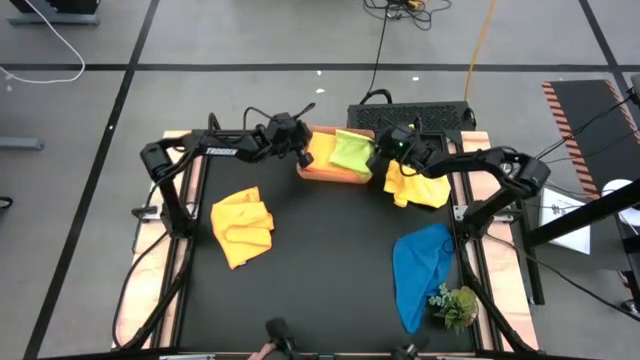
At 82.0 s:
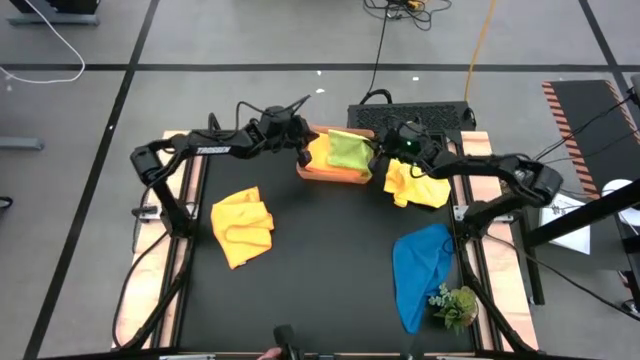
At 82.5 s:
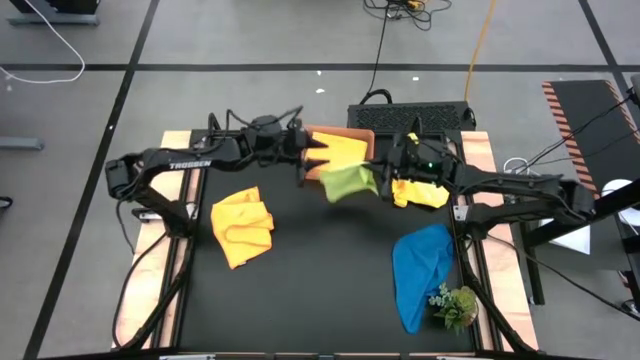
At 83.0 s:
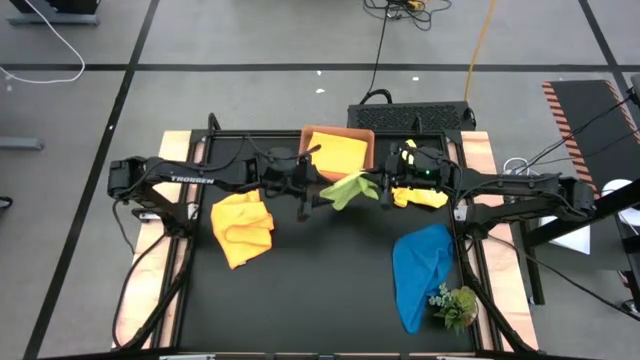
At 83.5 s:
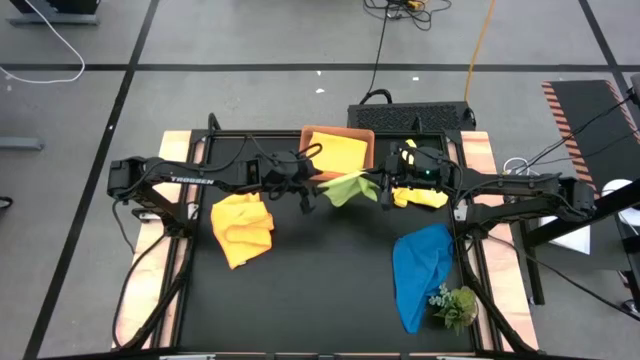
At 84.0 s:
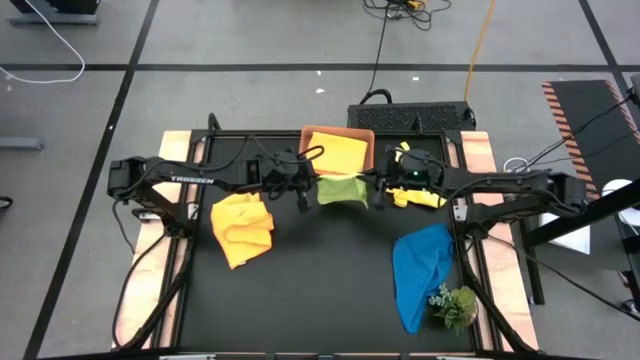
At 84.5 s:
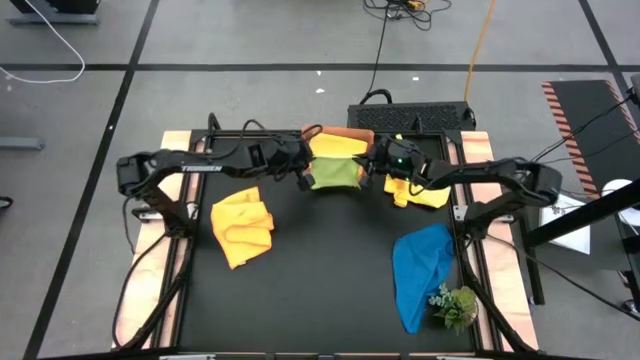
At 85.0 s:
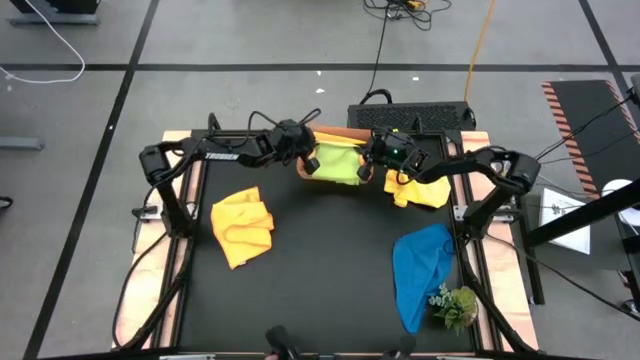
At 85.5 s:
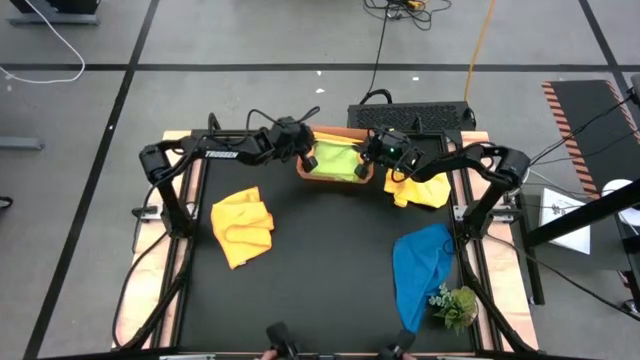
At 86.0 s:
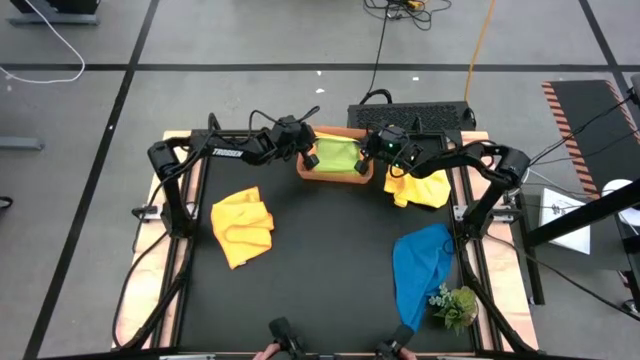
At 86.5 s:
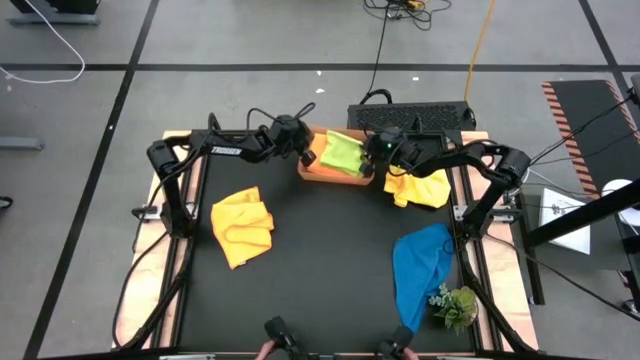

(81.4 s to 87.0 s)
Task: Fold microfiber towels
Put the green microfiber towel into the orange bin

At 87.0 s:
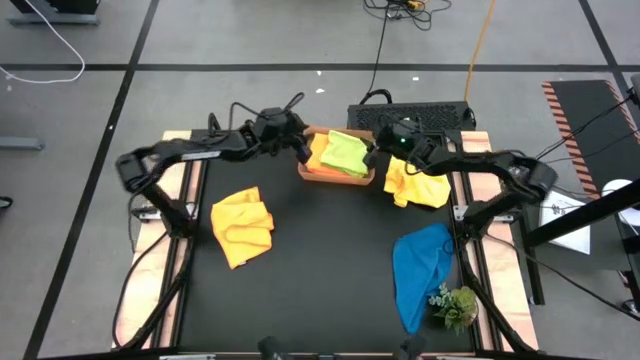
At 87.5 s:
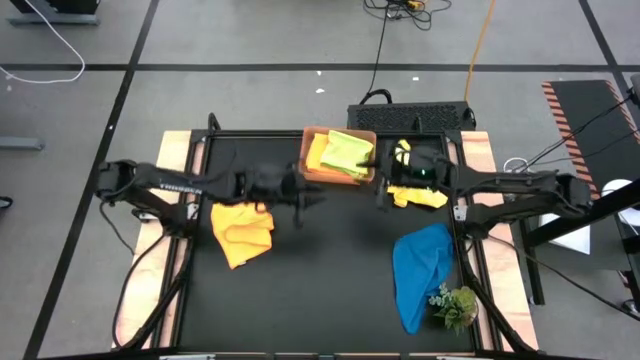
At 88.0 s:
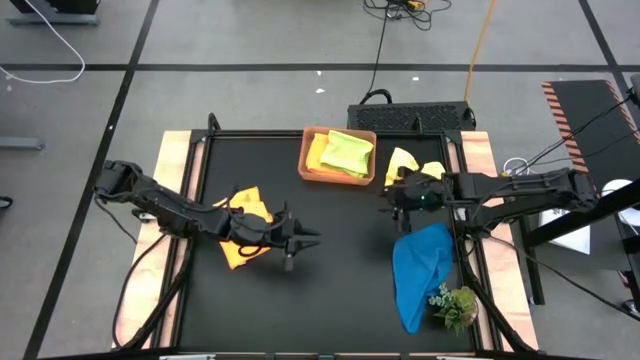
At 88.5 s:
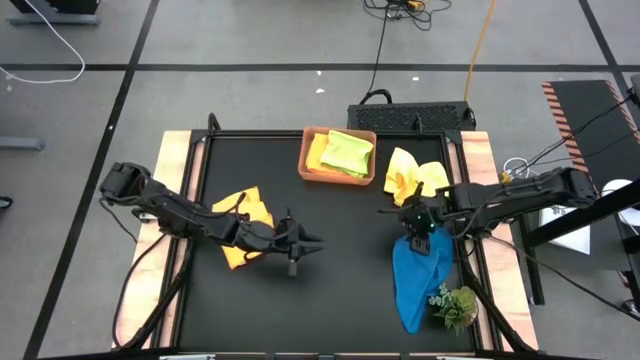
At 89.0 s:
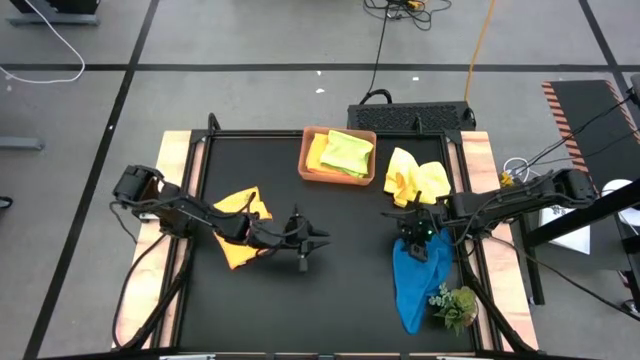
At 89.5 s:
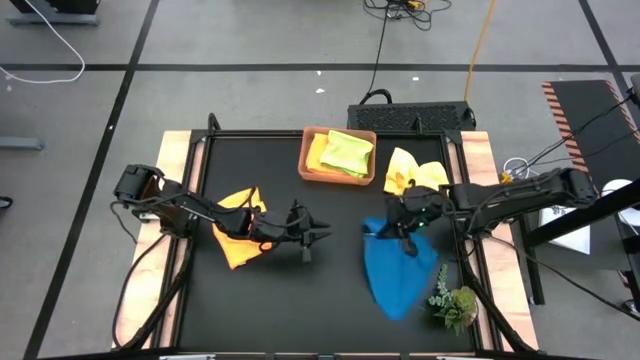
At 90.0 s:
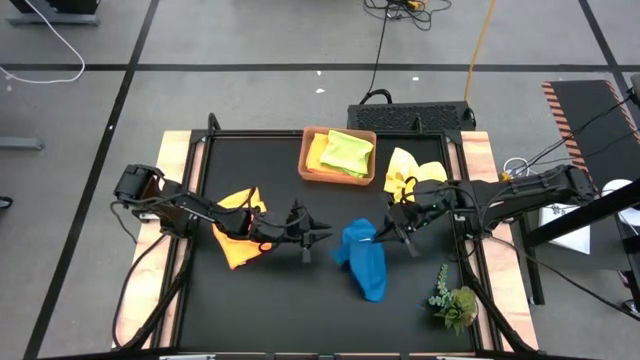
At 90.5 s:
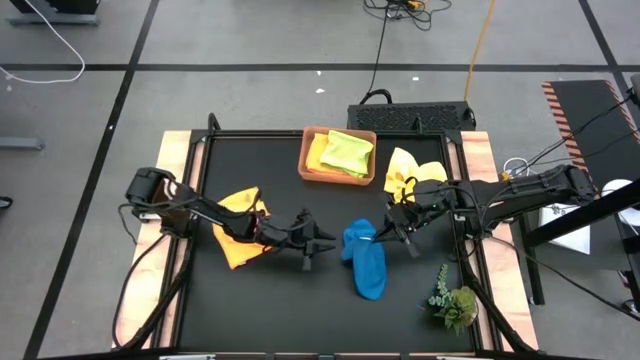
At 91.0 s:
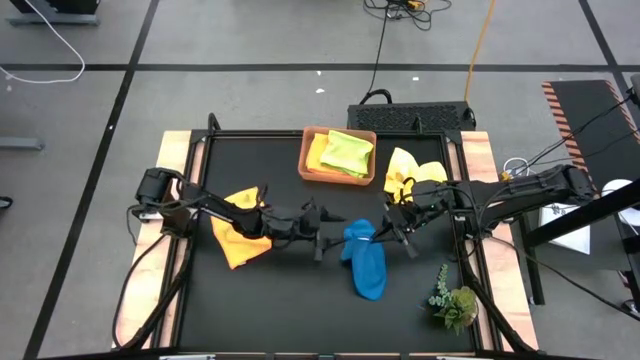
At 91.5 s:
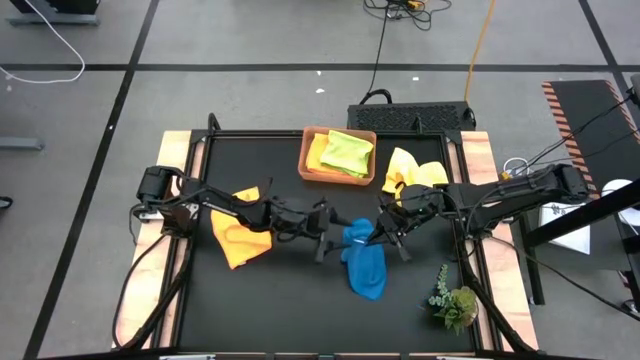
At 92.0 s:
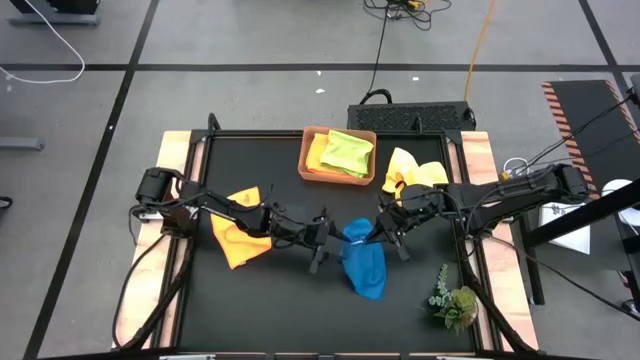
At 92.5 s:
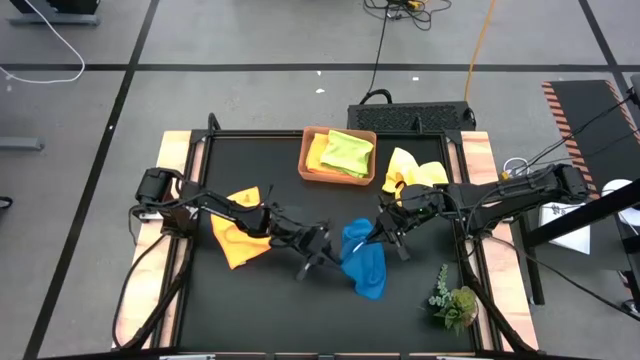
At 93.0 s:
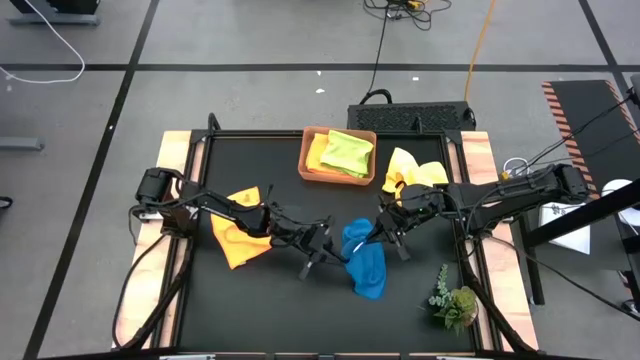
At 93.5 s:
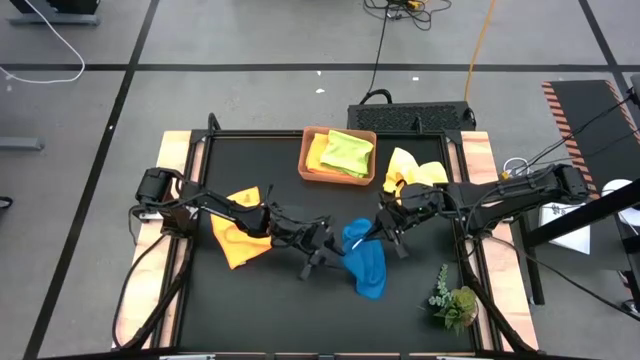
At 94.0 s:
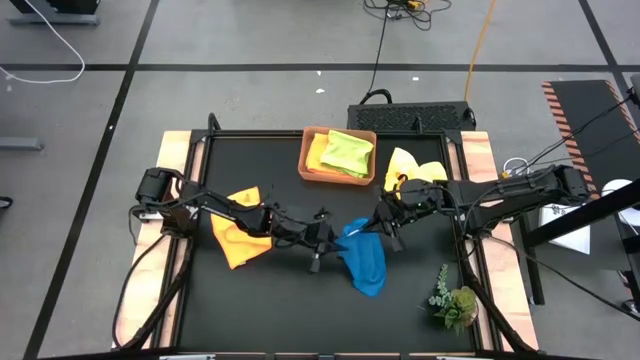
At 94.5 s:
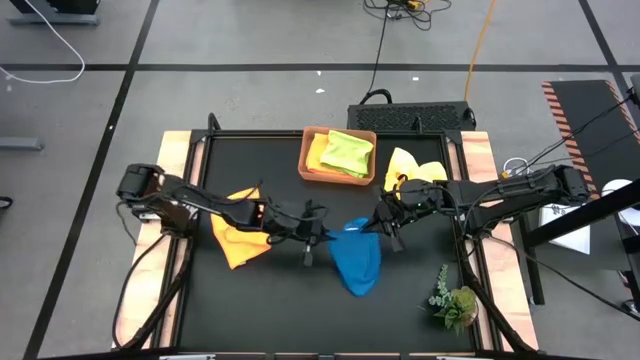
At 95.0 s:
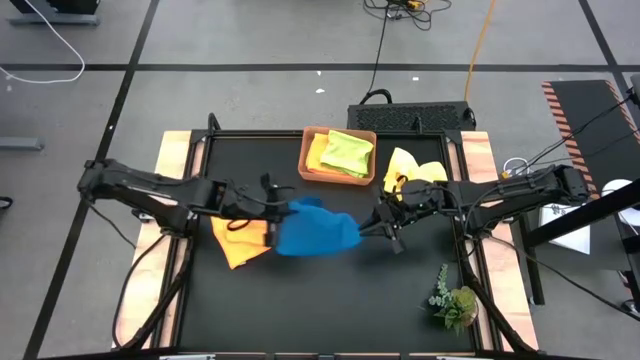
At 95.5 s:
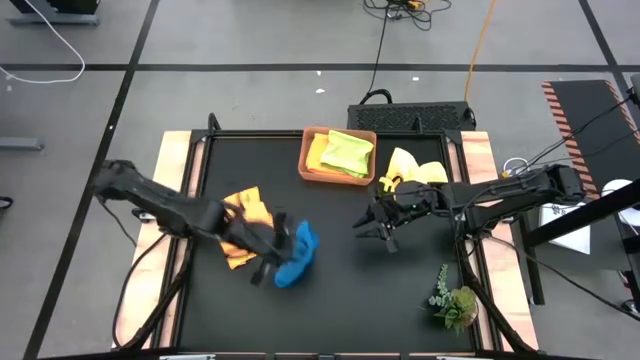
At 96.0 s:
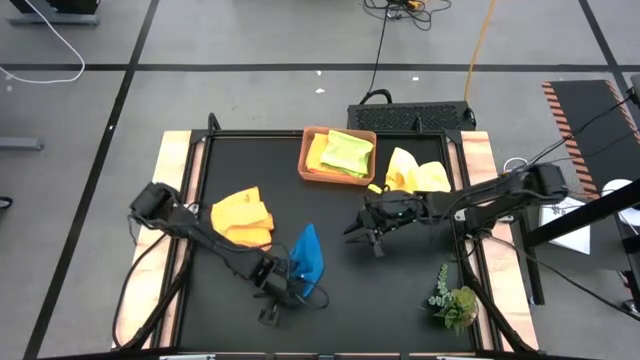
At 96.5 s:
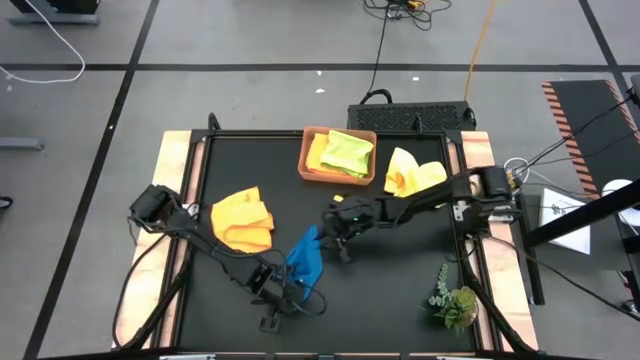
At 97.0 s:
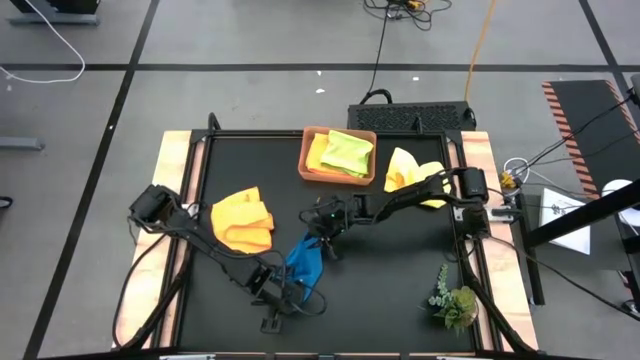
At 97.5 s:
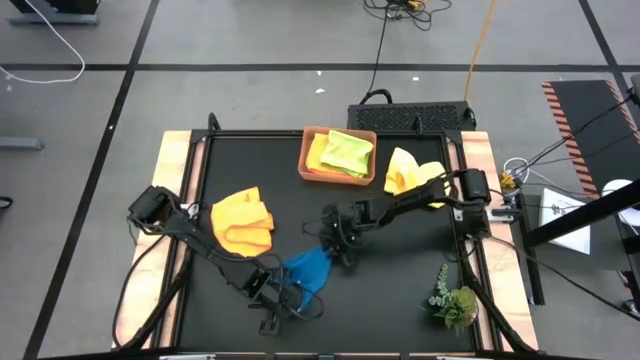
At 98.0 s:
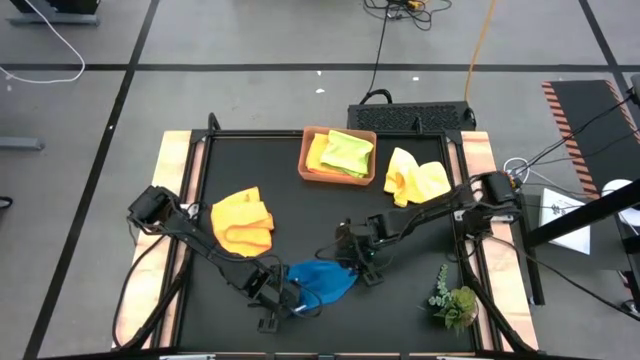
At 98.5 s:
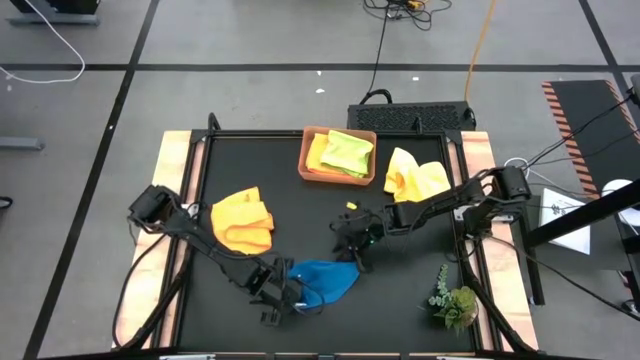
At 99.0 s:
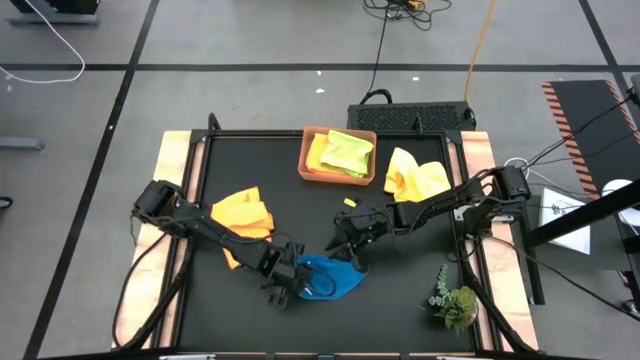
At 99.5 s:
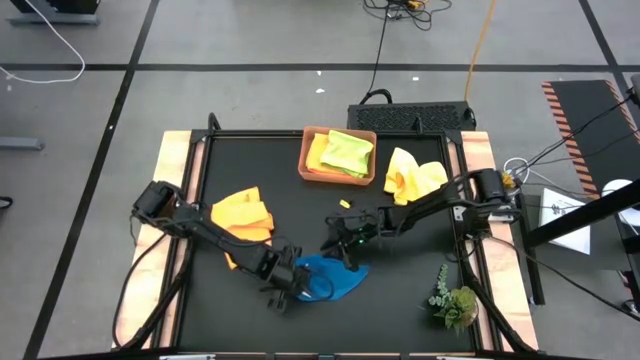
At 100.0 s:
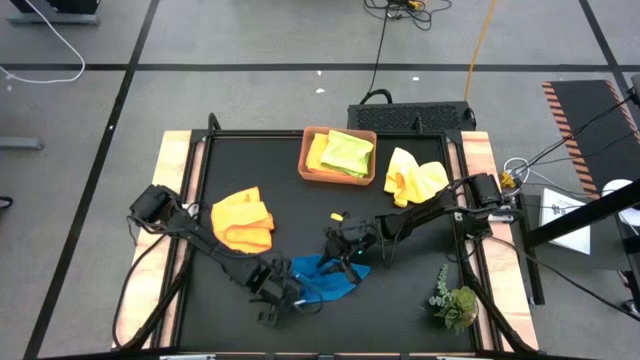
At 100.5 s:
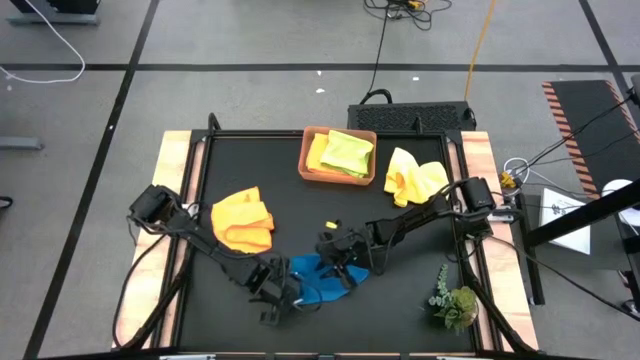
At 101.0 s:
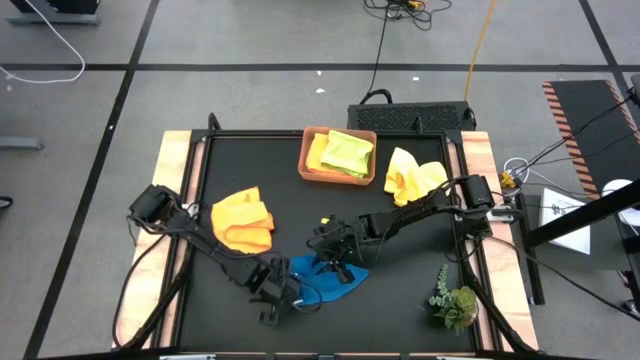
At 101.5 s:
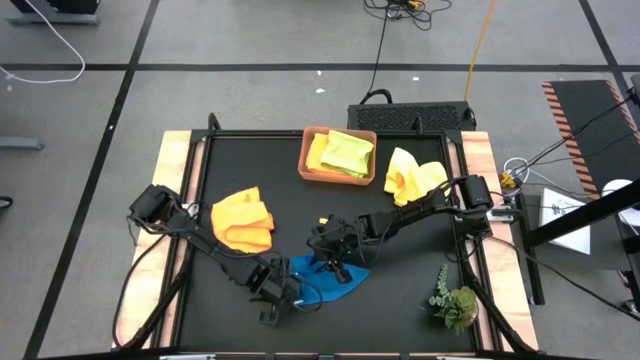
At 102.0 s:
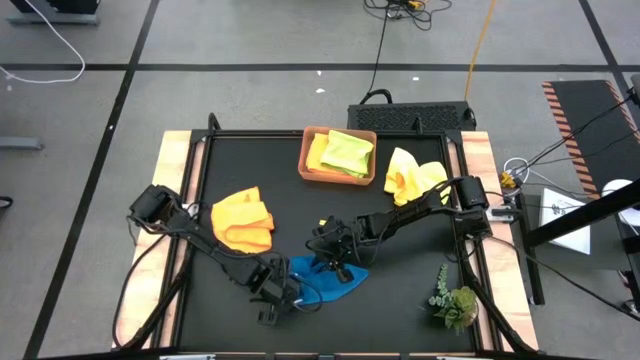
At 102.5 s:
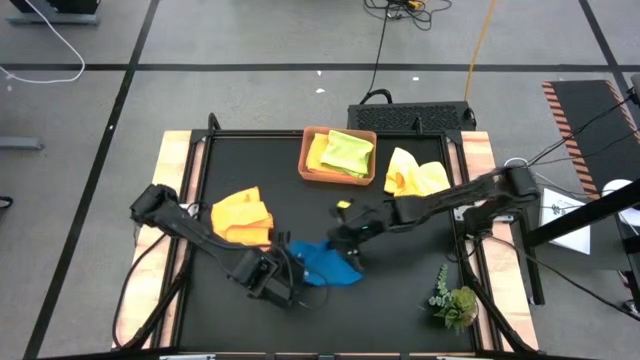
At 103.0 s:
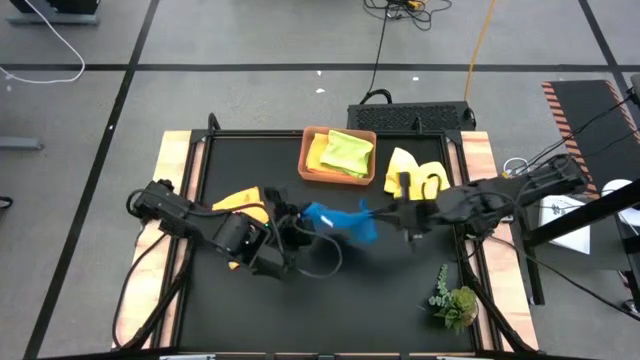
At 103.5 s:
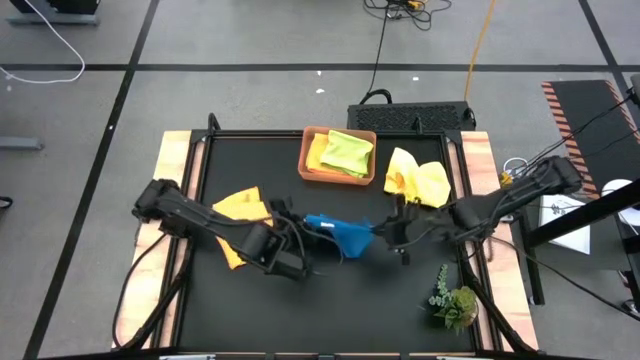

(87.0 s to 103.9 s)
Fold the blue microfiber towel
